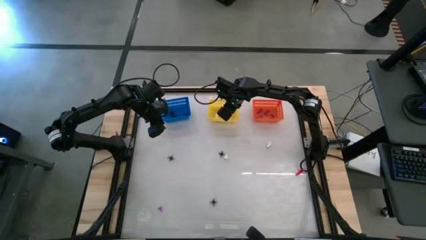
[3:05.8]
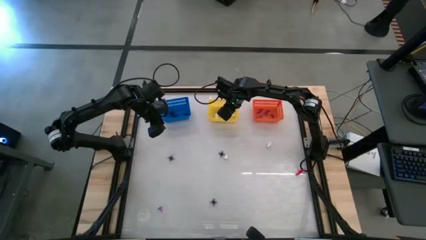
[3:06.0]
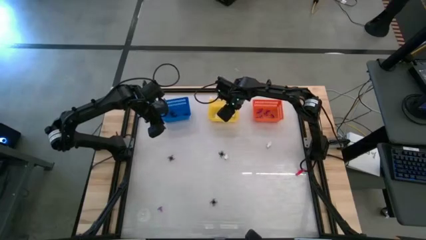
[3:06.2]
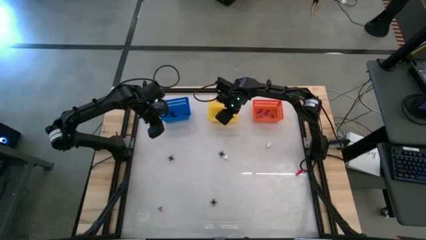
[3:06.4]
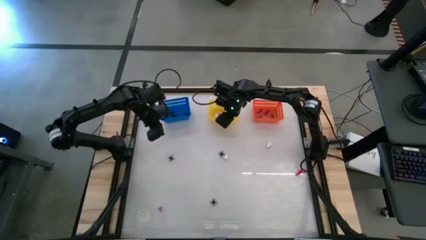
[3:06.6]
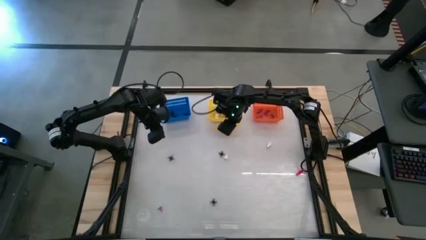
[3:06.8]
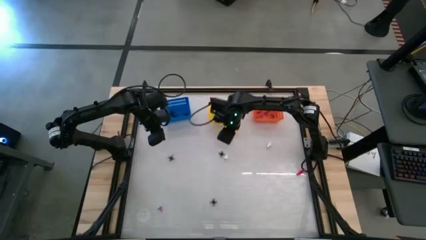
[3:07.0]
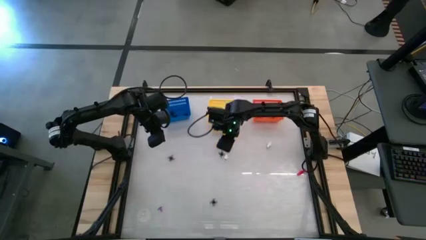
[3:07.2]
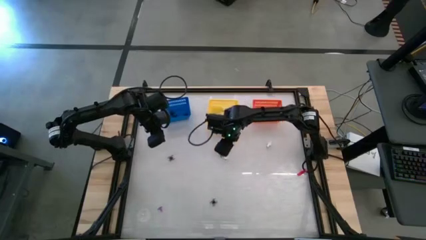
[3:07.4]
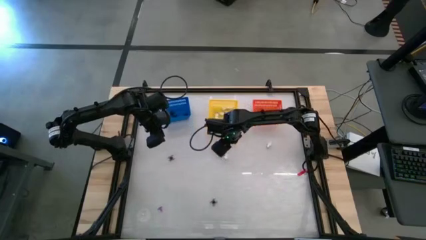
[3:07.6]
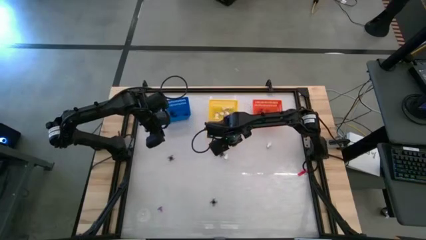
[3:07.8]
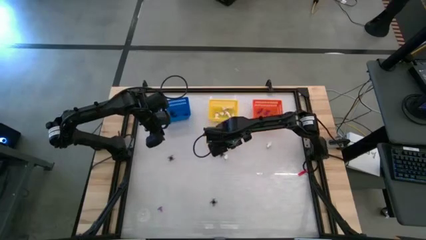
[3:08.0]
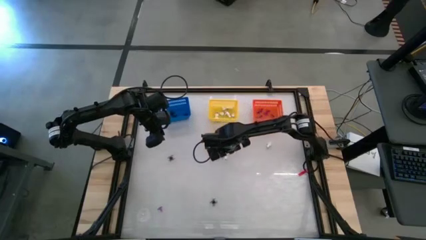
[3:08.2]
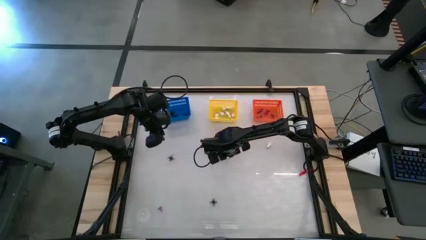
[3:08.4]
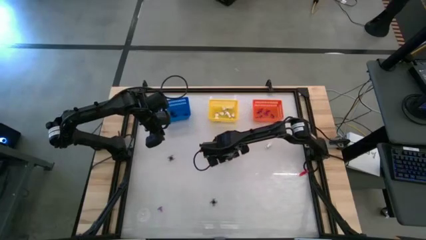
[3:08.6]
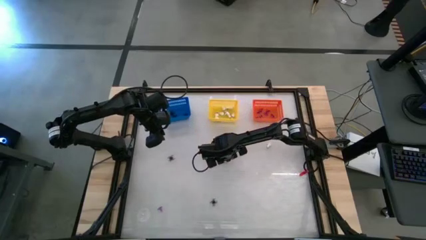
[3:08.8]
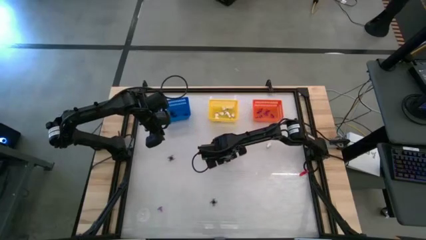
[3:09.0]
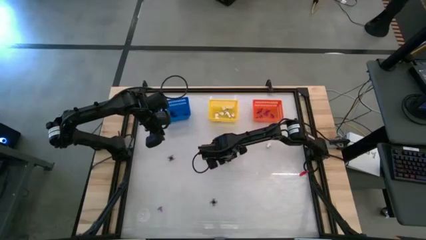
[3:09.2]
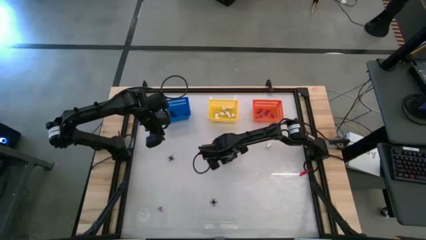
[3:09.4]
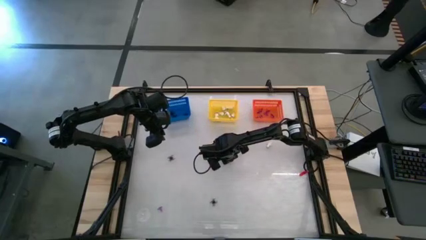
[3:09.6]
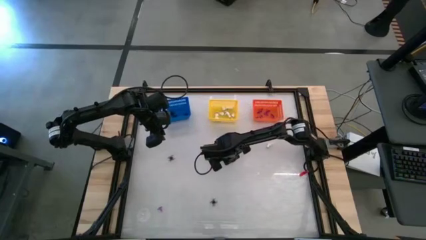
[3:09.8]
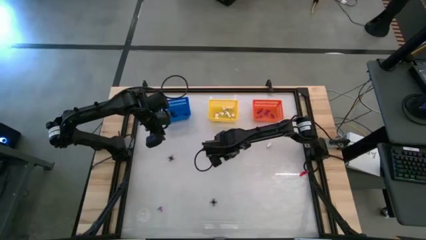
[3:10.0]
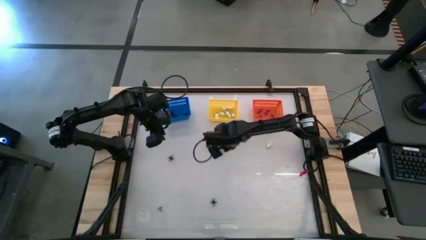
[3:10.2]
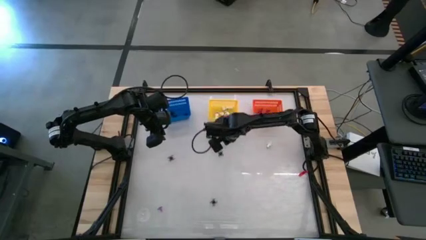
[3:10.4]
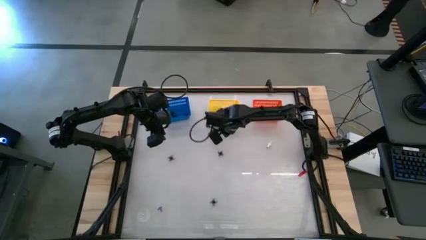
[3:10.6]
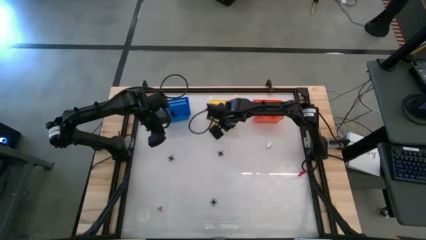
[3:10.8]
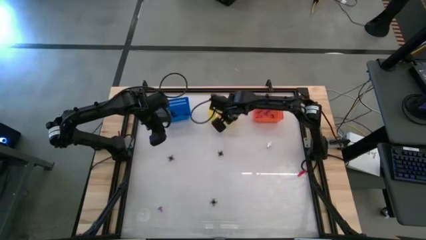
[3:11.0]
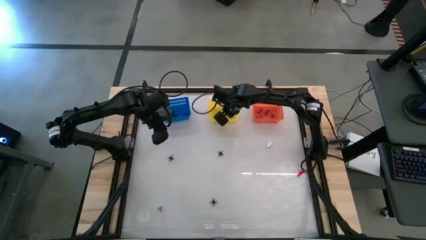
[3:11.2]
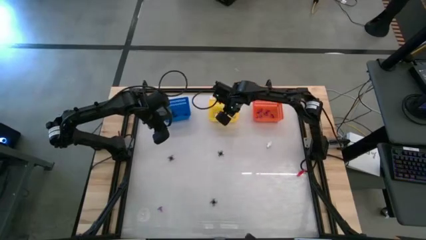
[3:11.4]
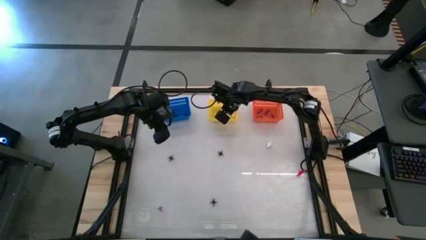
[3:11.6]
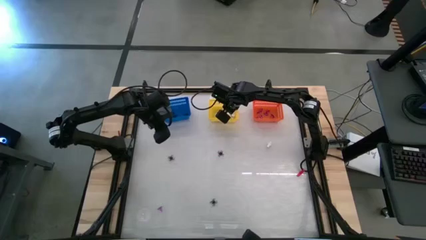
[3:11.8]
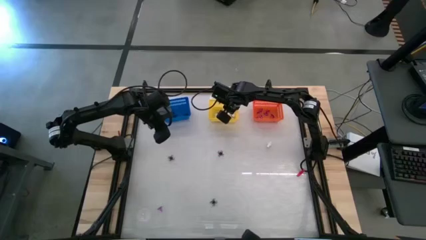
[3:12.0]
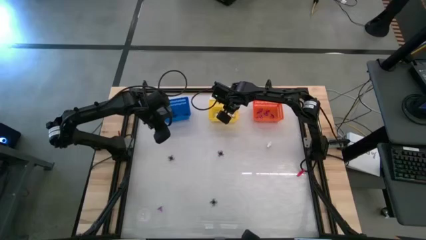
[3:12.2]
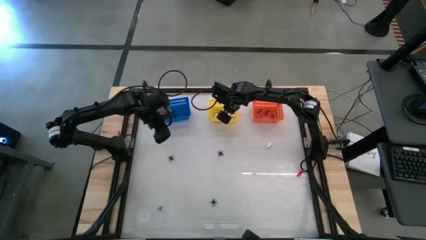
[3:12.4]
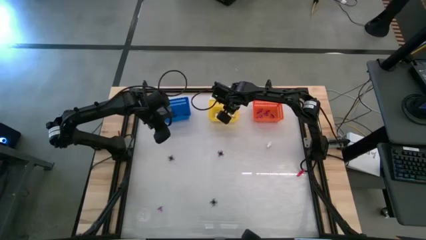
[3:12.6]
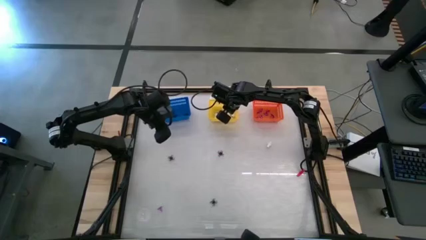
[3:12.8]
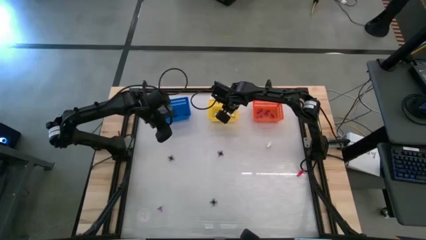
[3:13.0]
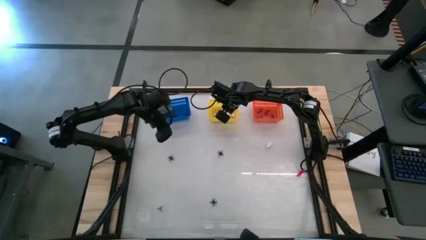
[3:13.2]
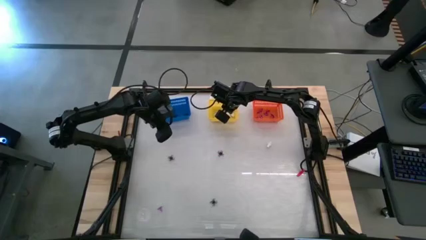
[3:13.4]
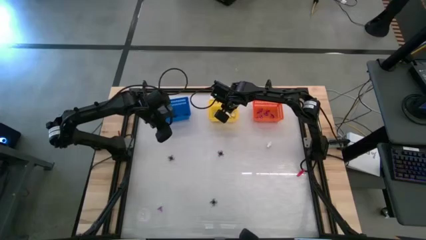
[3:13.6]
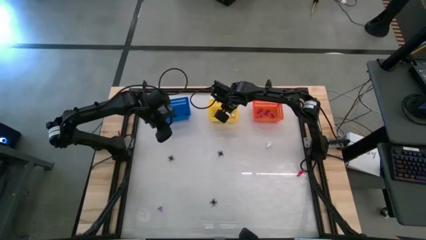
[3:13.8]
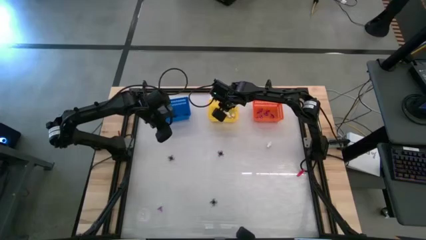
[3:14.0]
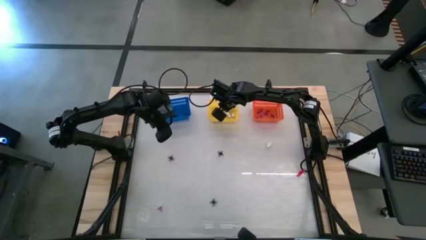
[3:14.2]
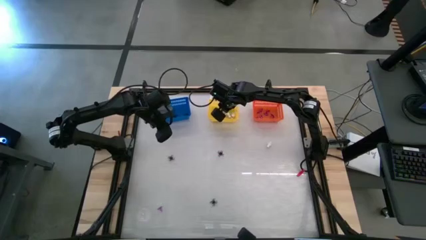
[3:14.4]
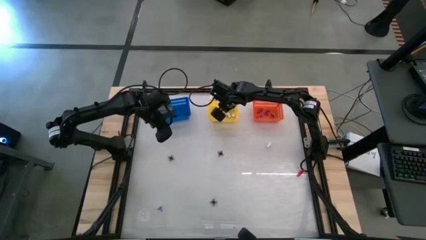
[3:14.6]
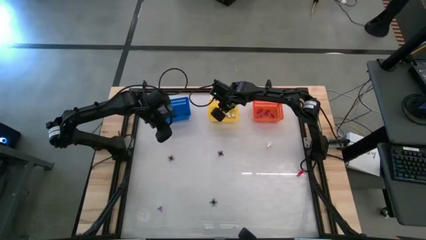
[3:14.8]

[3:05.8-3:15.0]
Task: Sort Halloween decoration
Put the white skeleton toy into the yellow basket

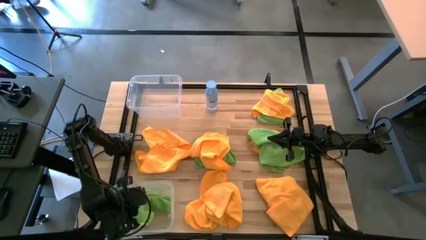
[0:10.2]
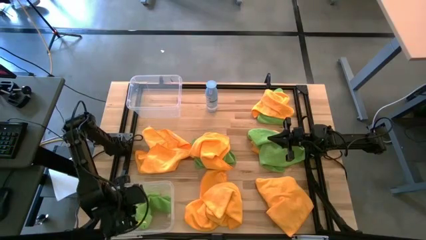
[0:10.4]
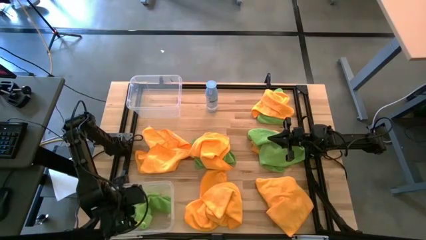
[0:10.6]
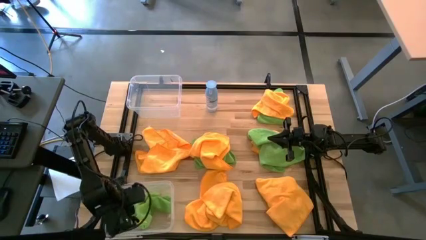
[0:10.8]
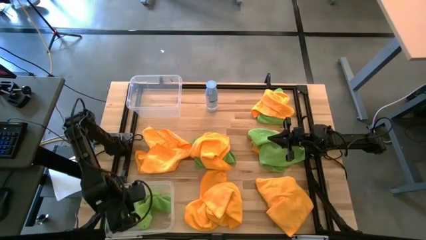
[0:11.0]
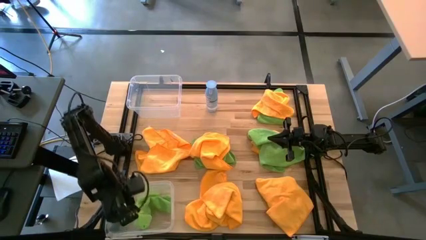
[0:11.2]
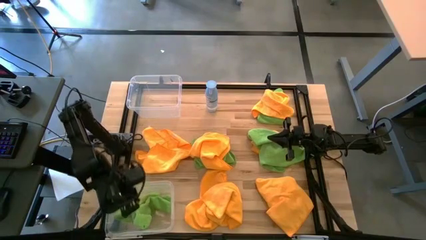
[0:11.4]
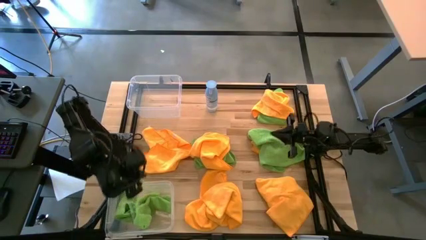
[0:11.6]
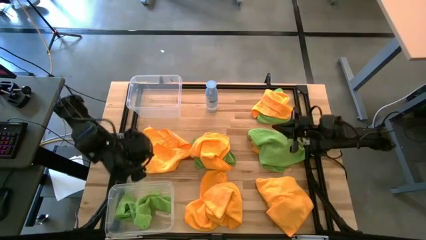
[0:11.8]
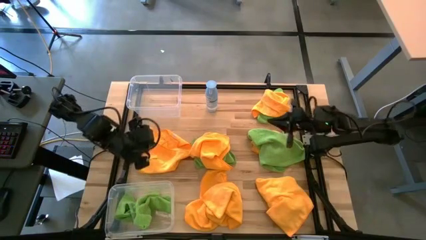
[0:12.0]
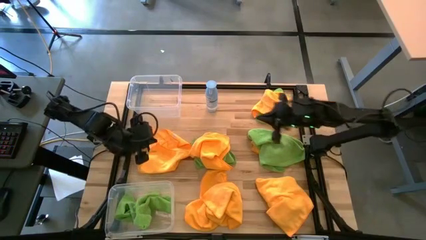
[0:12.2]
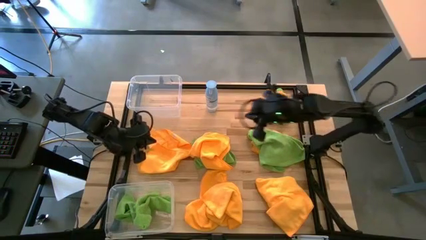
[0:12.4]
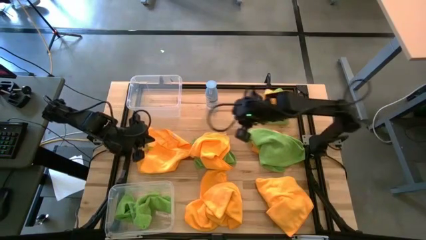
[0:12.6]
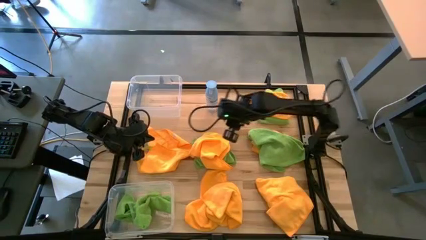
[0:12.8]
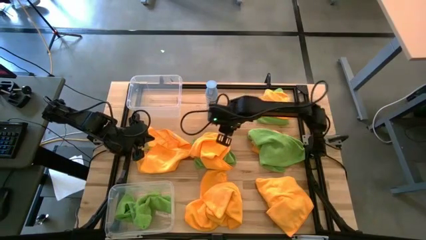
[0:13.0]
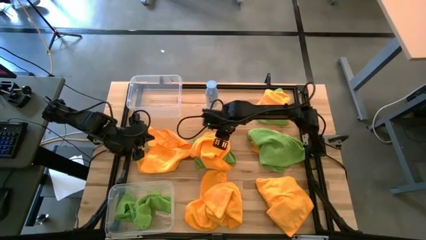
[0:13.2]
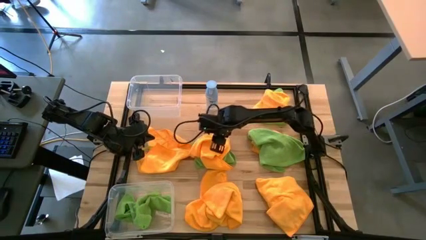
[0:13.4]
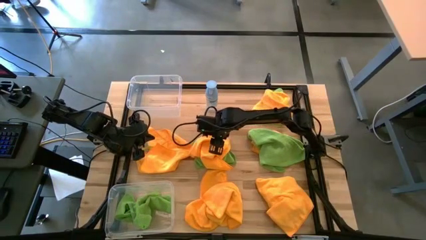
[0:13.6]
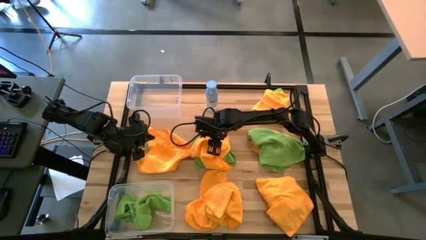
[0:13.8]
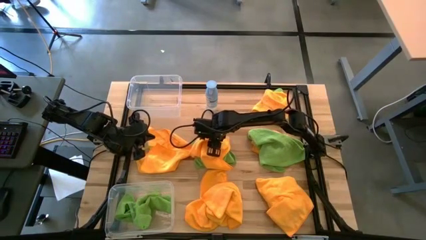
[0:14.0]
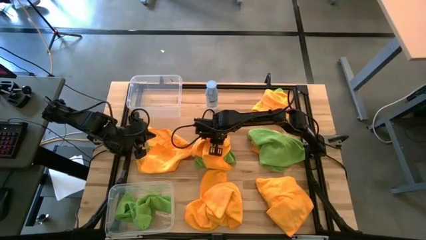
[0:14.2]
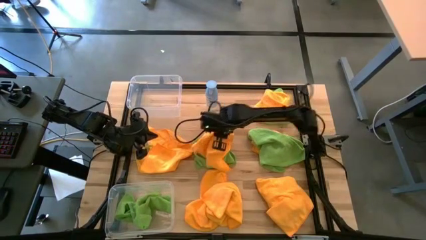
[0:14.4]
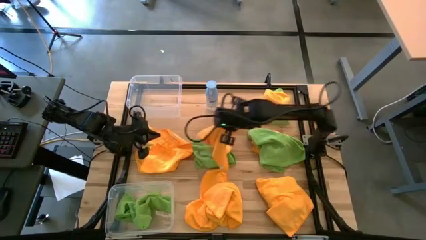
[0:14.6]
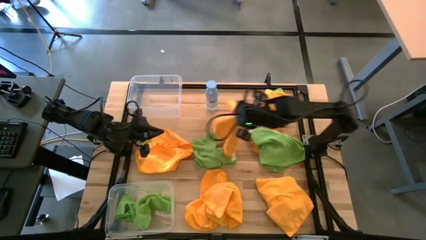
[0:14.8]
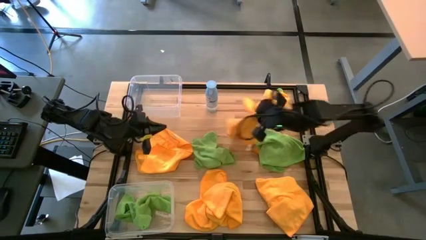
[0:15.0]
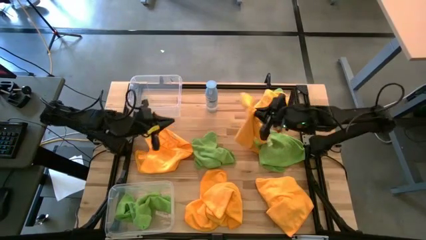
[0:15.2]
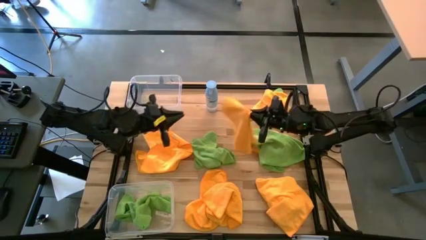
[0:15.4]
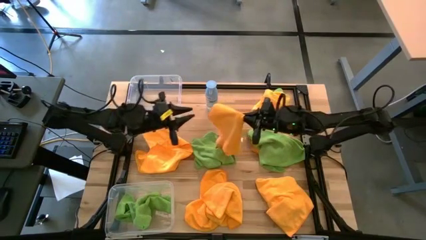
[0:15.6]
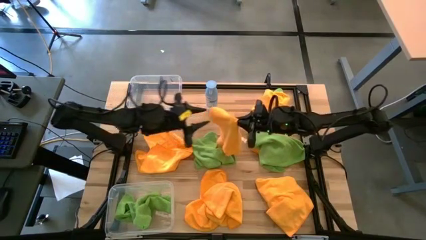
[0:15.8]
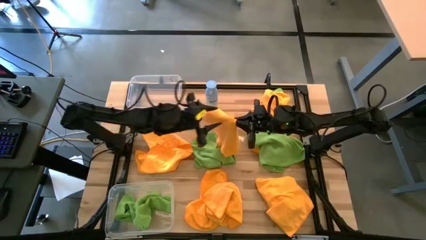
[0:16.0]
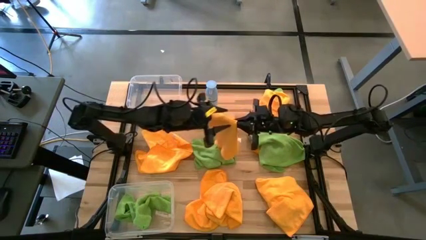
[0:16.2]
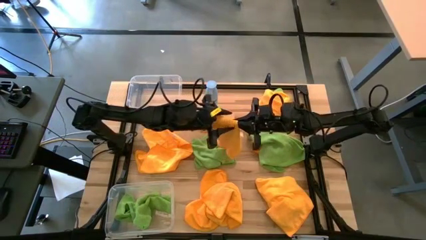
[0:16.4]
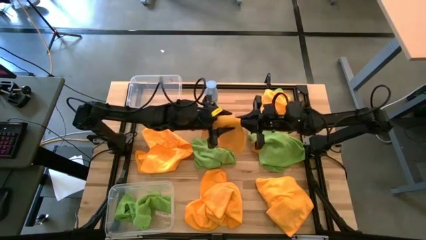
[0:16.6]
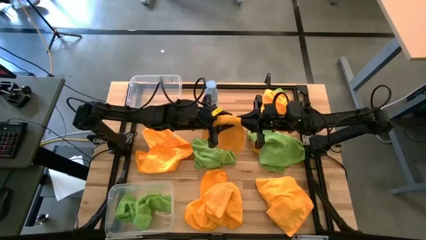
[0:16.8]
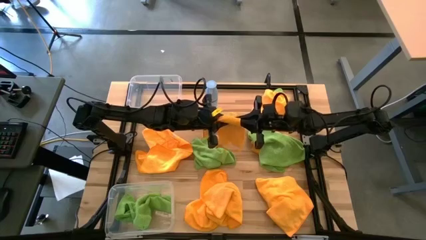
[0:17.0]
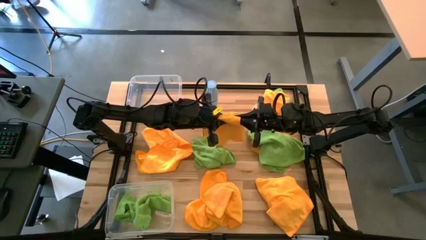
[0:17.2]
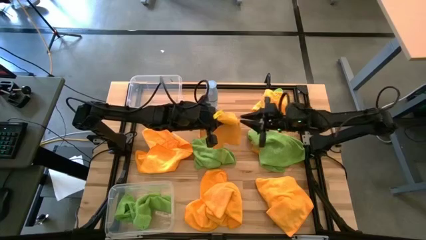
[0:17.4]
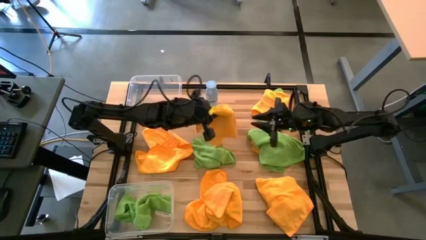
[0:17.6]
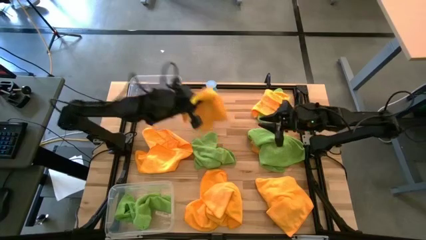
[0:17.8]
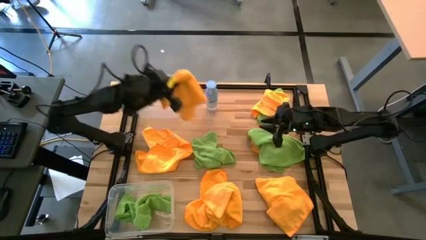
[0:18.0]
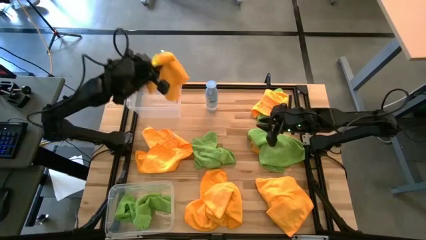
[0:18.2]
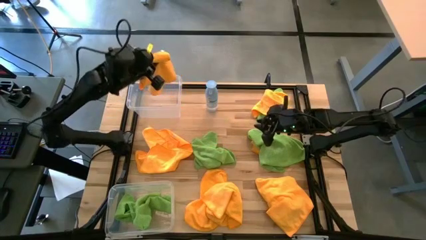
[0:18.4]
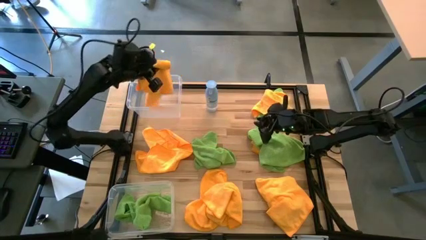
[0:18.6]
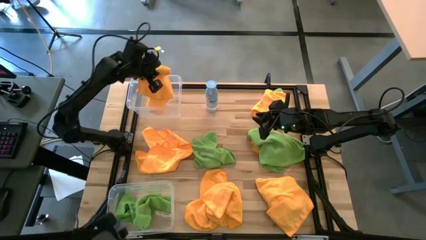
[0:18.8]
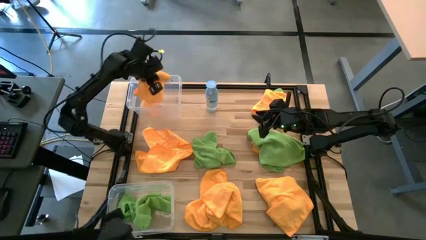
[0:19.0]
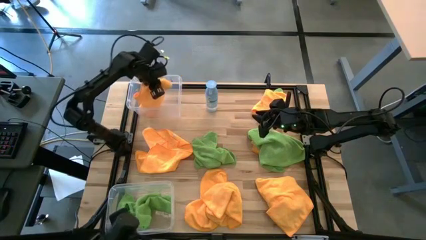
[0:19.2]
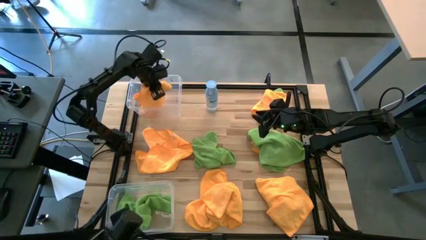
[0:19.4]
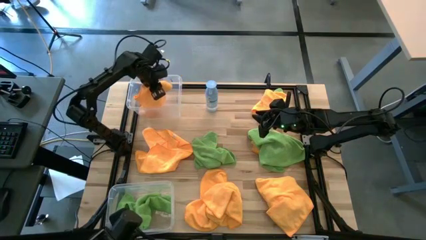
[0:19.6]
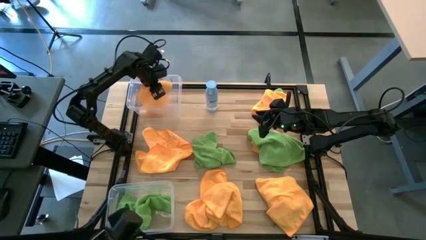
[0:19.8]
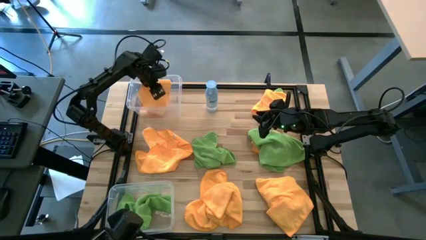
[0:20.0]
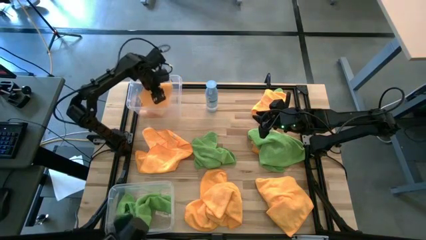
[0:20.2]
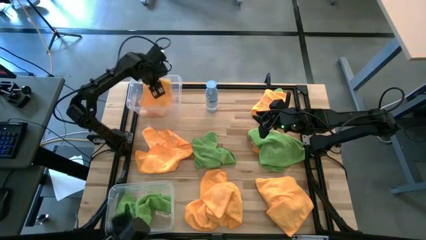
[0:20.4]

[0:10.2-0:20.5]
Task: Sort microfiber towel by color & place in baskets
Put the yellow microfiber towel into the top transparent bin
